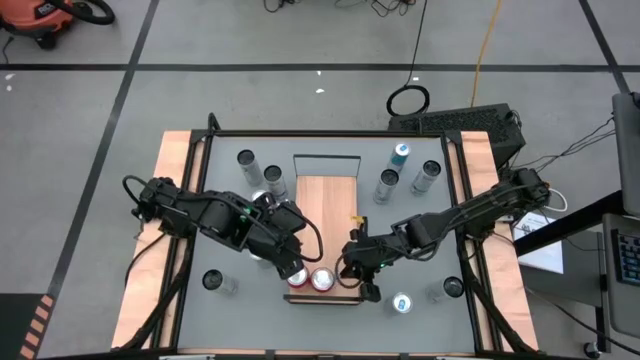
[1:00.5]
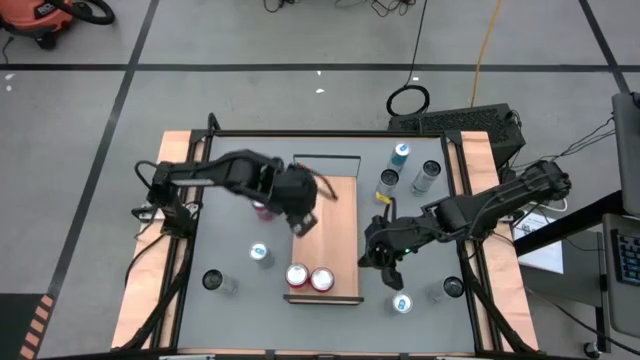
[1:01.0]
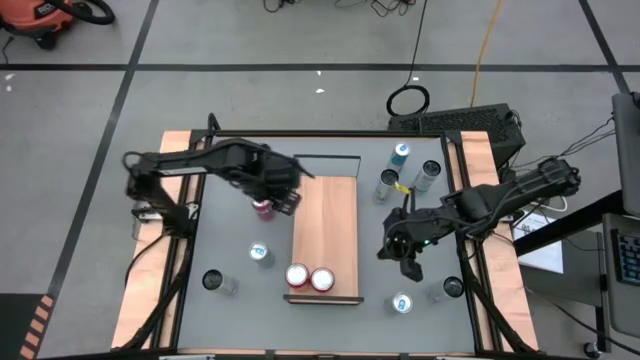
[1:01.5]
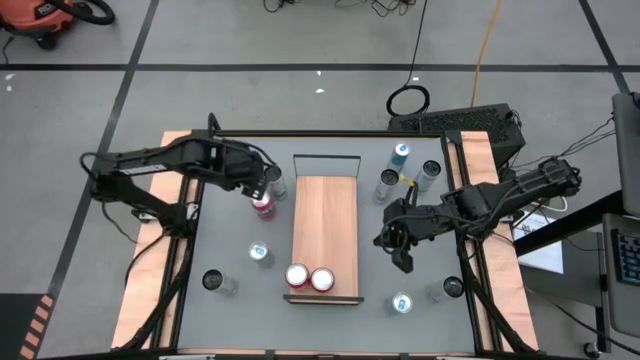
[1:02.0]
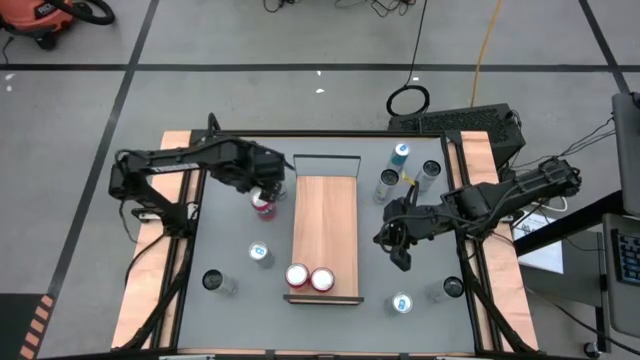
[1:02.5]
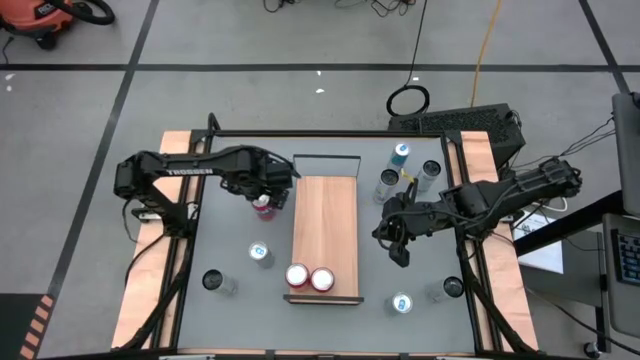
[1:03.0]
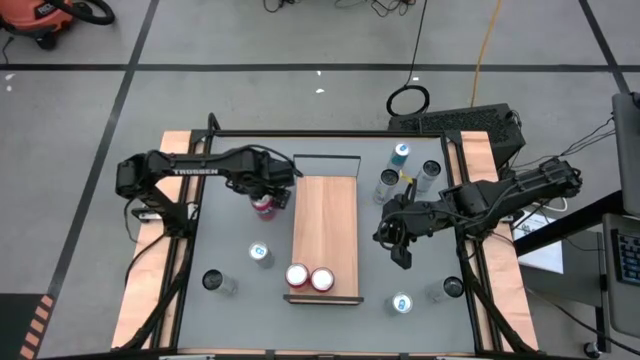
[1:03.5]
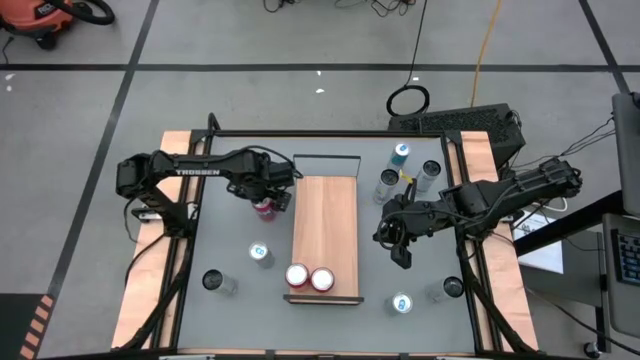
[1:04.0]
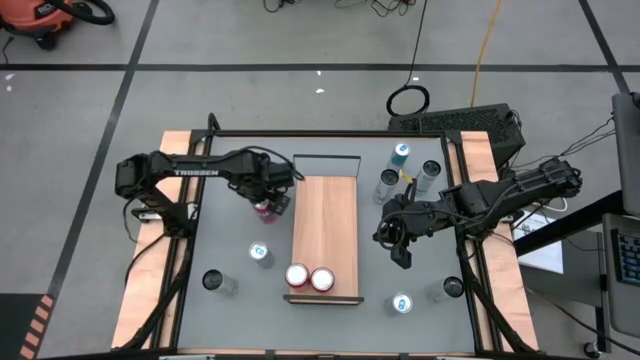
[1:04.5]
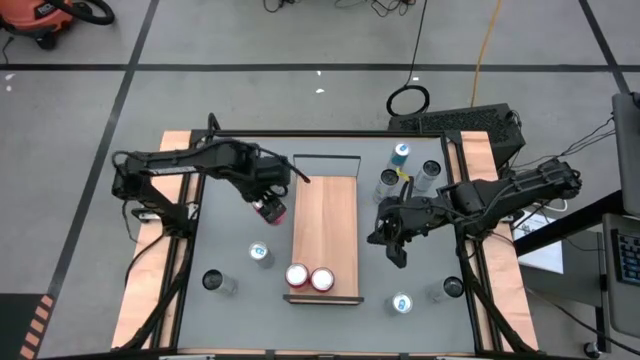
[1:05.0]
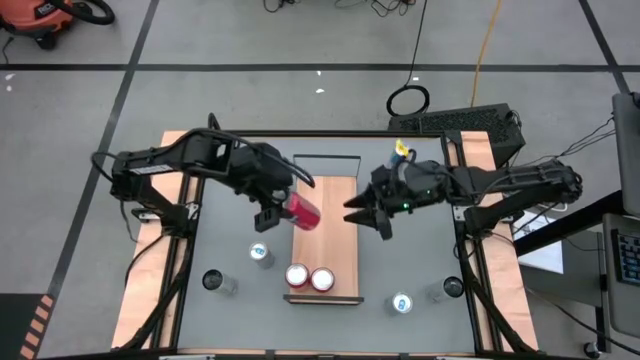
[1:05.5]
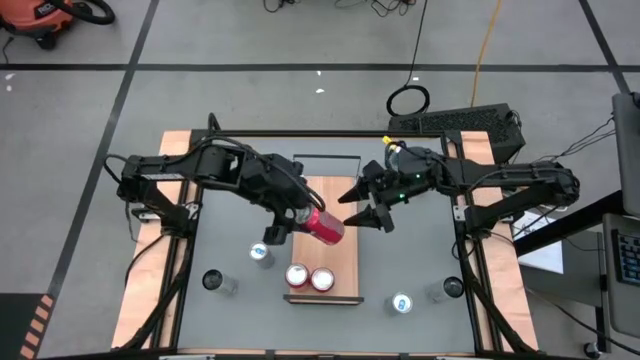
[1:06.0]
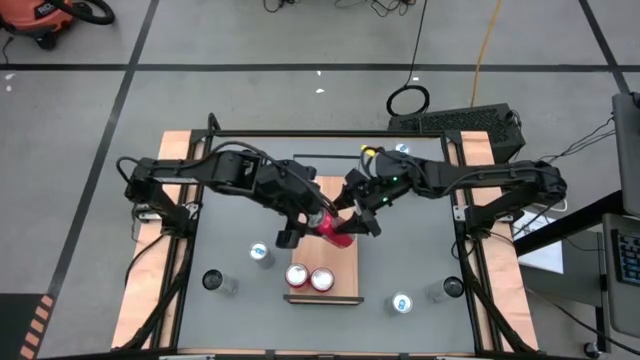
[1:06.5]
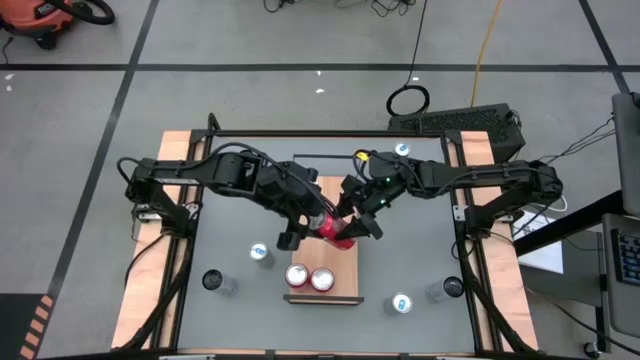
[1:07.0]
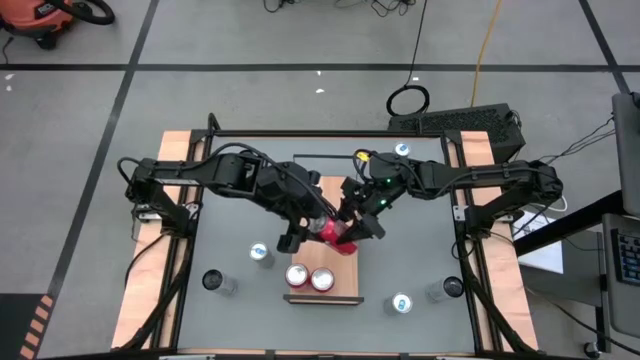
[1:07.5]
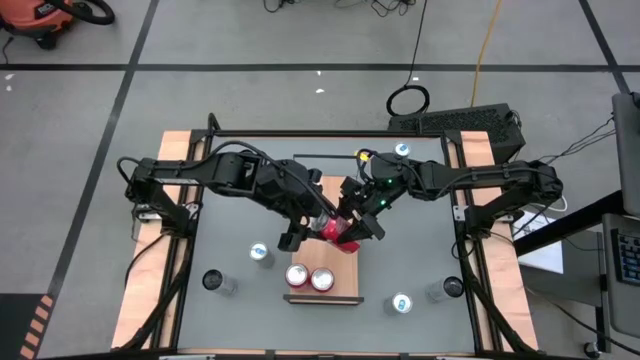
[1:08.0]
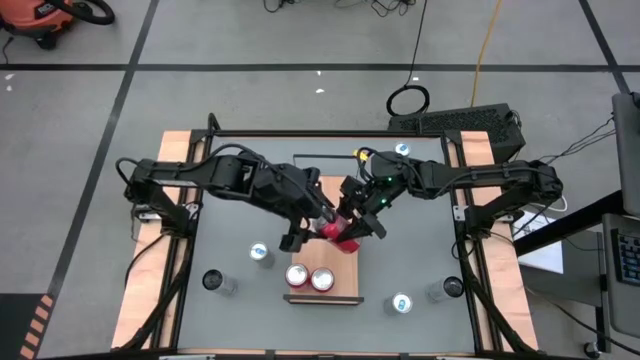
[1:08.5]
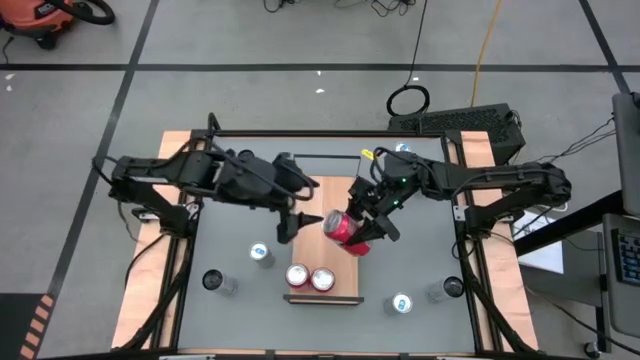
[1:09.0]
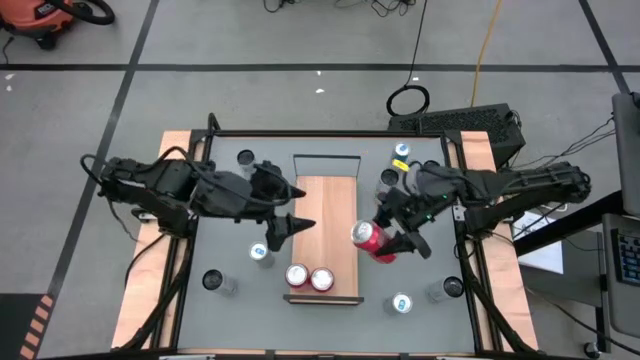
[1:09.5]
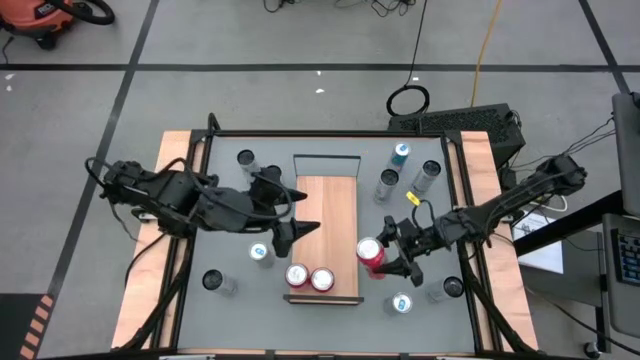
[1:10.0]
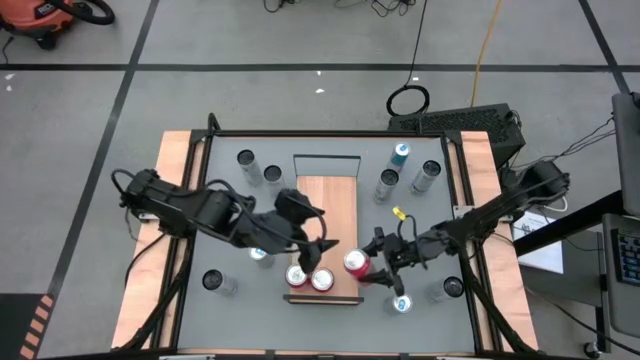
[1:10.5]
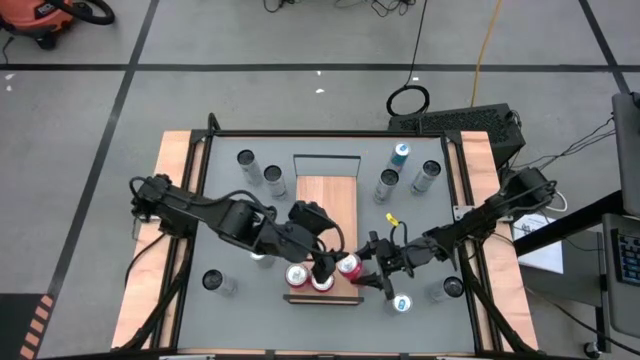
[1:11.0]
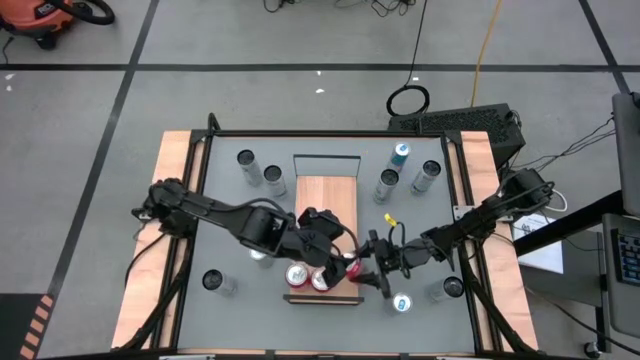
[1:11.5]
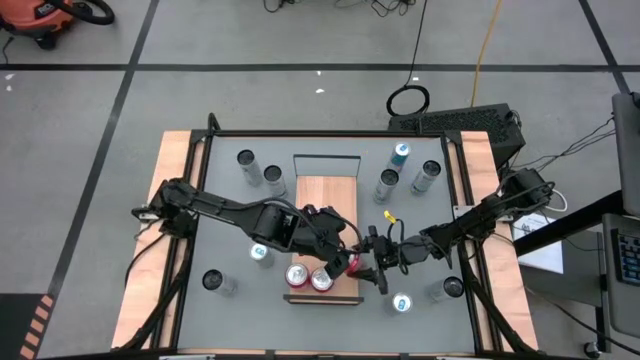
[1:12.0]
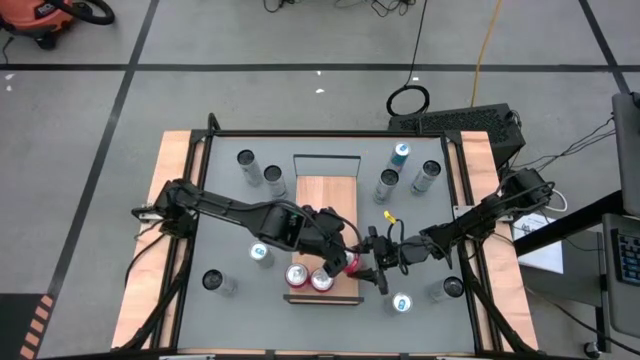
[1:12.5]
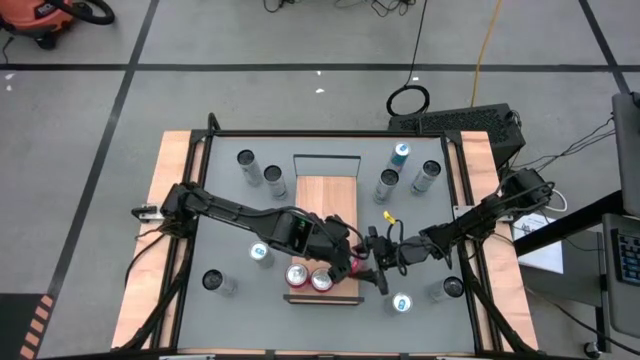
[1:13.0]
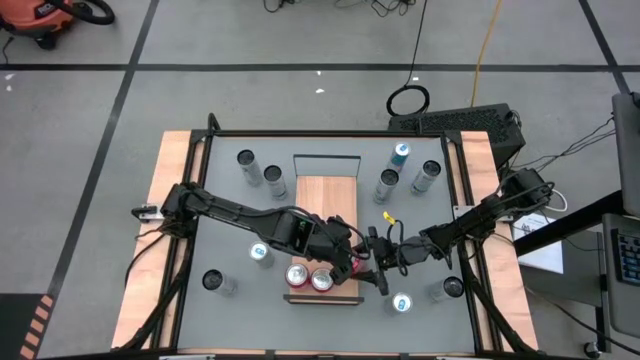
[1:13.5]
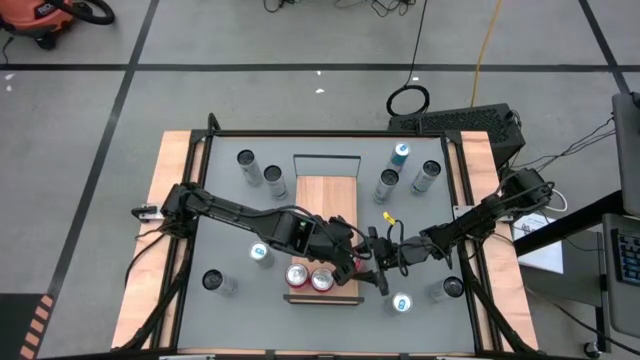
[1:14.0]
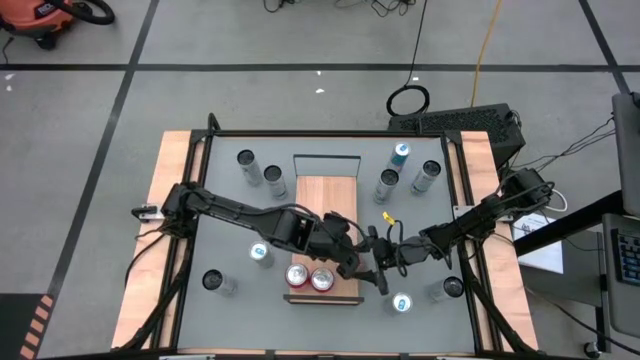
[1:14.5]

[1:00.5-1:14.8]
Task: Sort soda cans
Put the red soda can on the shelf and align it with the other red soda cans
